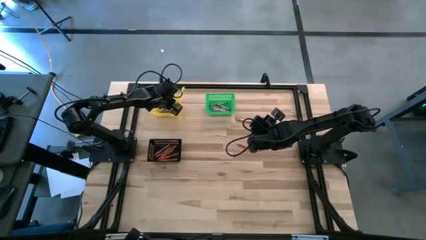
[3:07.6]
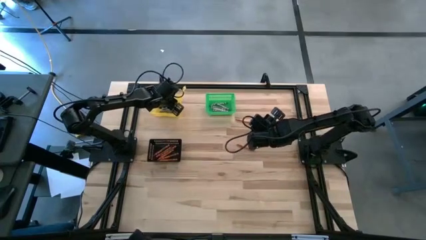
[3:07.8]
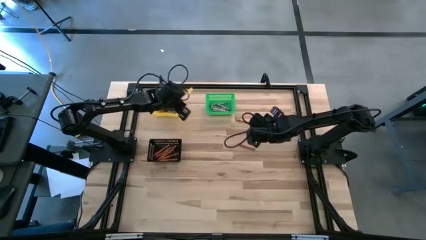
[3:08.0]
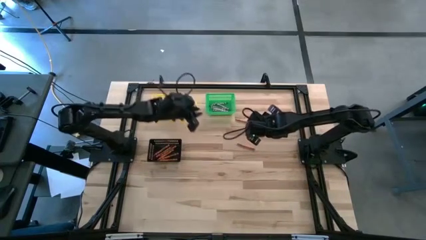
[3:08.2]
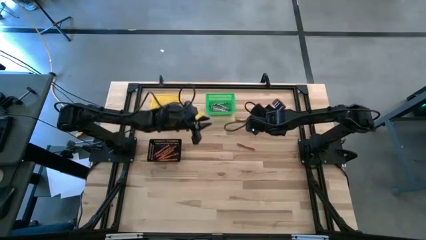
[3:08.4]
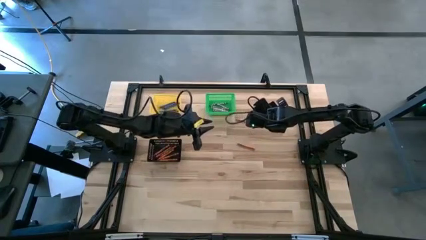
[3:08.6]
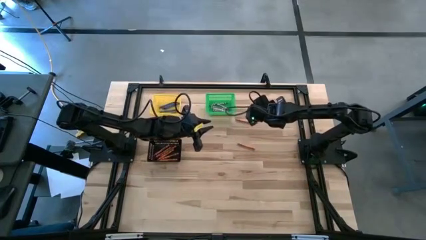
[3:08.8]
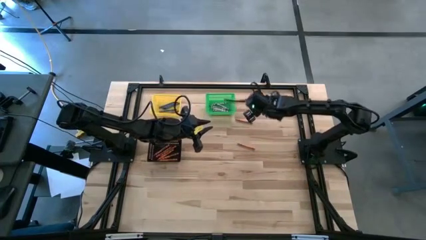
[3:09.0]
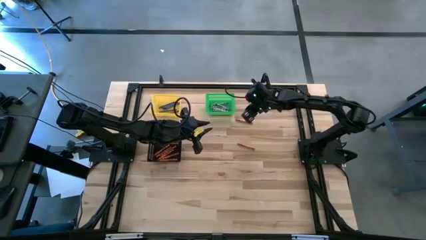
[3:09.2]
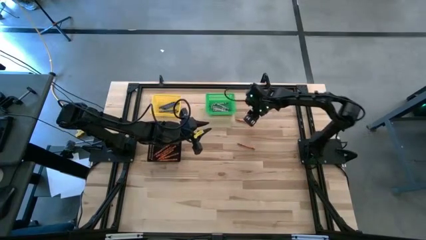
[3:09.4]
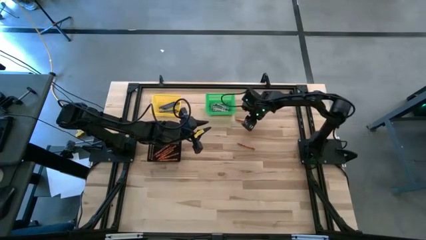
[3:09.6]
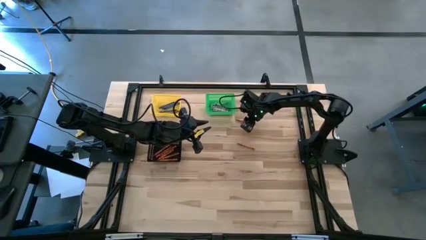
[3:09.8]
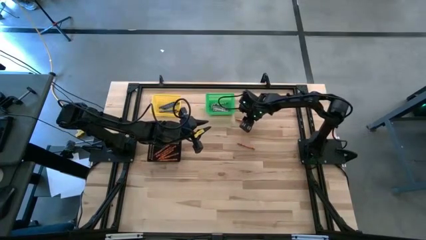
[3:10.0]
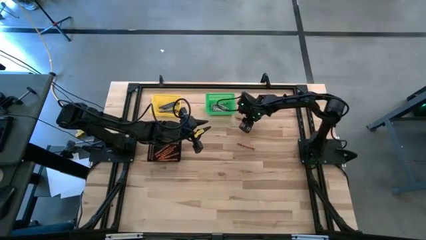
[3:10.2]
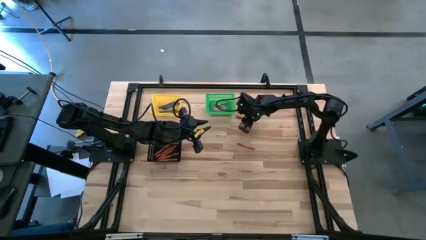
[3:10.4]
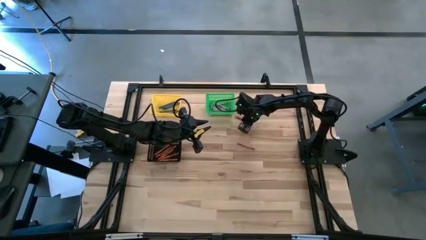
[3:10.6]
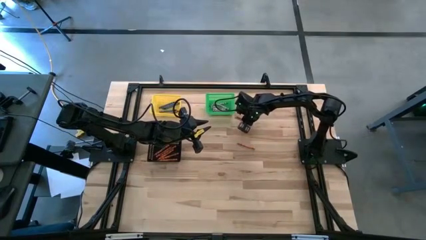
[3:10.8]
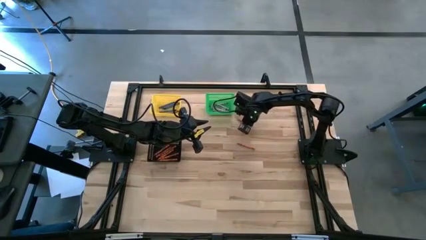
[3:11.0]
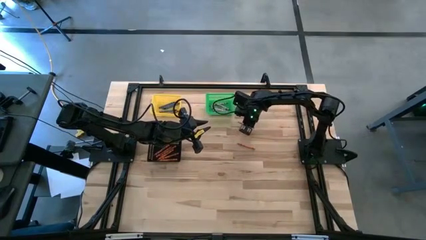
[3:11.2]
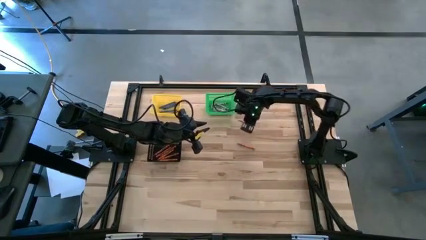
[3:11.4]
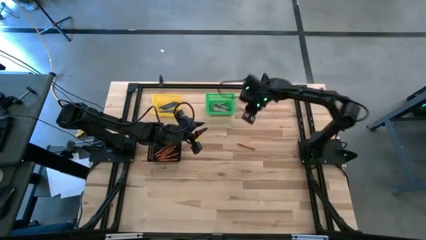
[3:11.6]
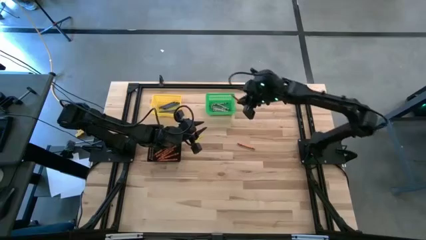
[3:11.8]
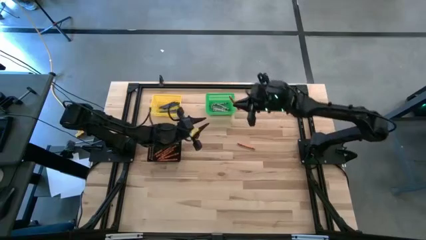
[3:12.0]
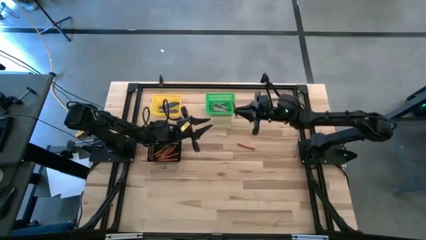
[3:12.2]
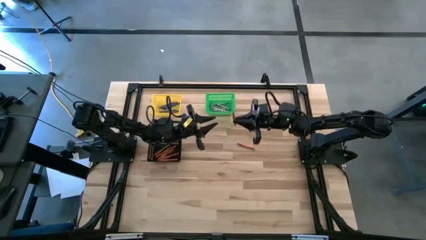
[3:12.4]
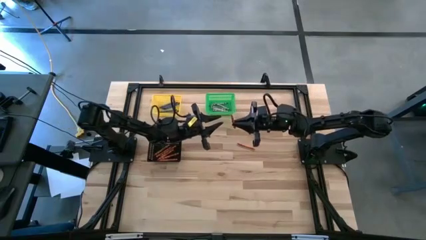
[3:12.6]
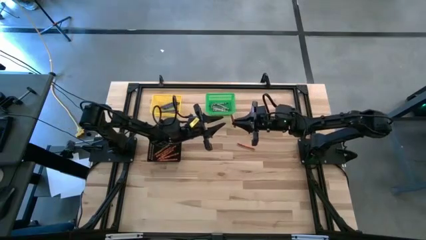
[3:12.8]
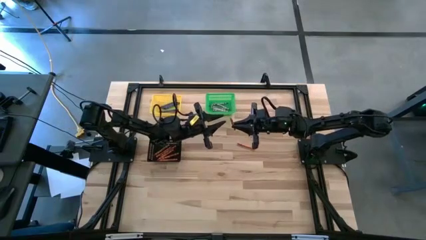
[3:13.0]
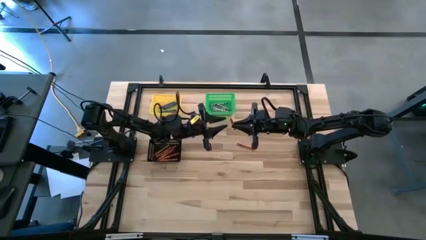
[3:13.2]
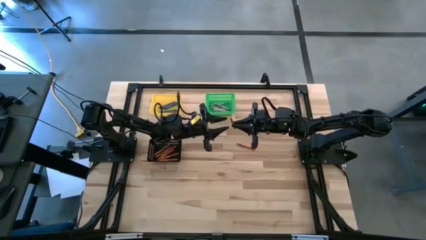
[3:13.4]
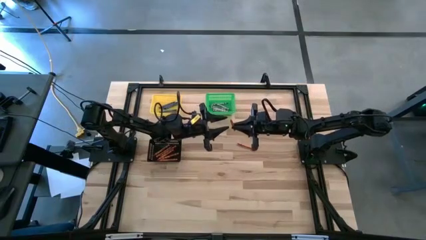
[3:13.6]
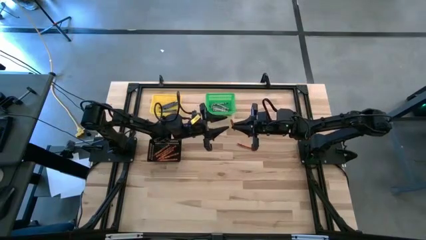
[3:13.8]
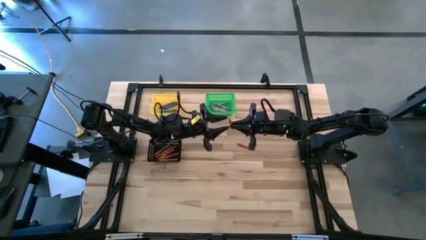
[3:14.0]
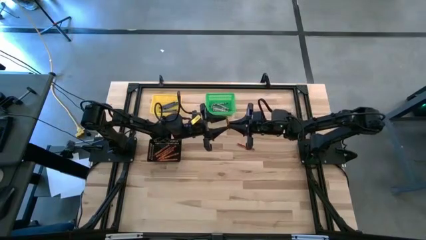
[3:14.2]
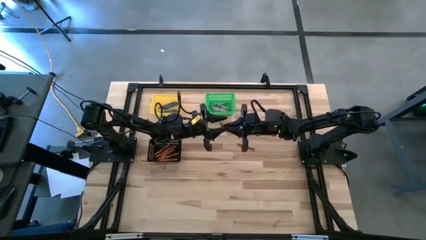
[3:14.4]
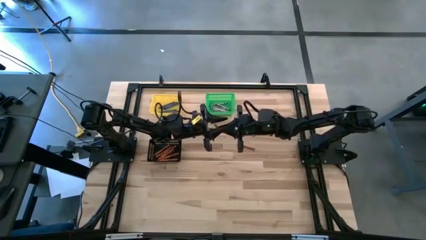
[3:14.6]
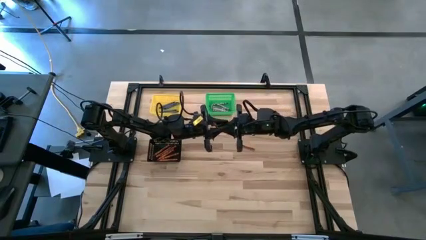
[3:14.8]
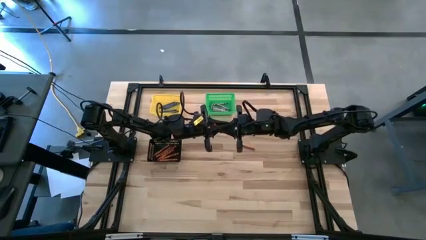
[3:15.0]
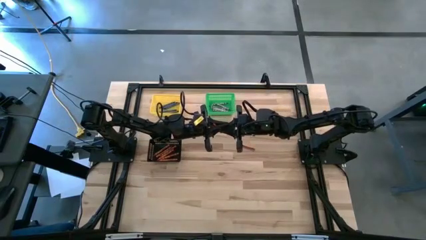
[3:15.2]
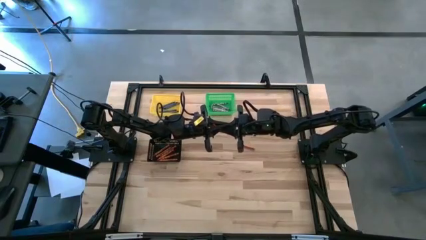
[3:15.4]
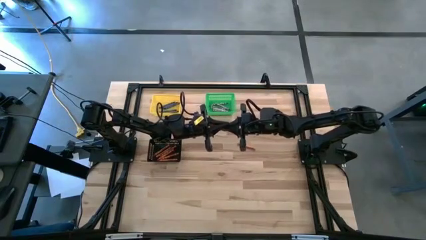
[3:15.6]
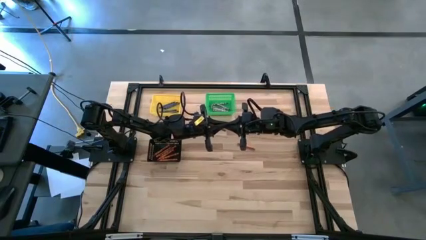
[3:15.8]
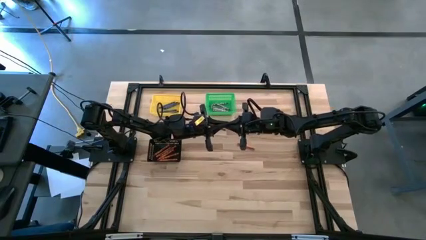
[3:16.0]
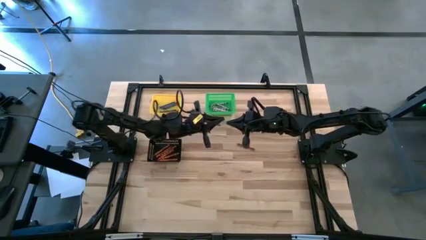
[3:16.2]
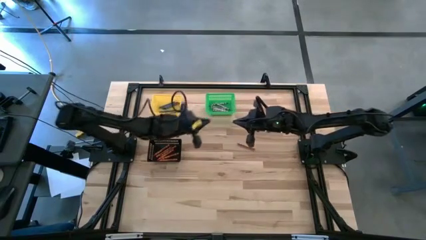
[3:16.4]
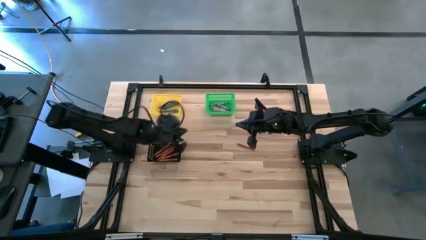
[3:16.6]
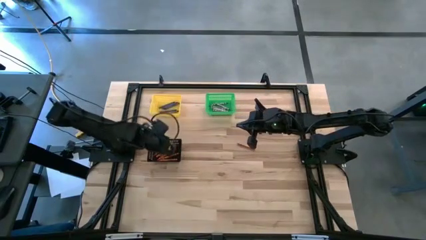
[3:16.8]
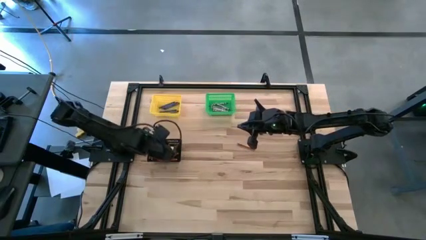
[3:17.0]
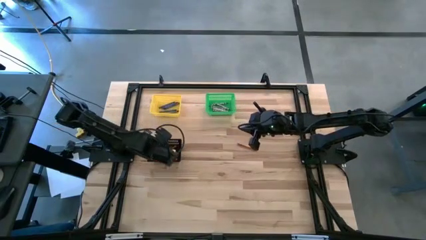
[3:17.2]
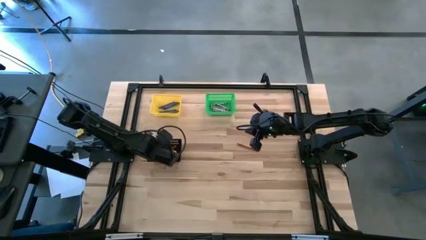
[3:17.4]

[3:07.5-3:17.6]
Task: Sort crayons
Put the orange crayon into the black bin

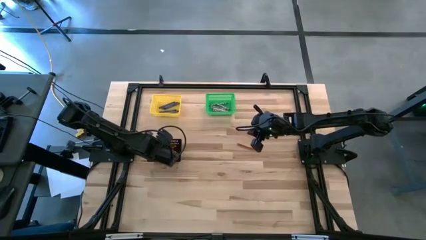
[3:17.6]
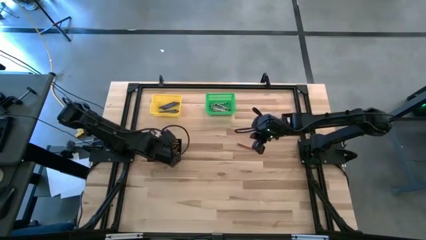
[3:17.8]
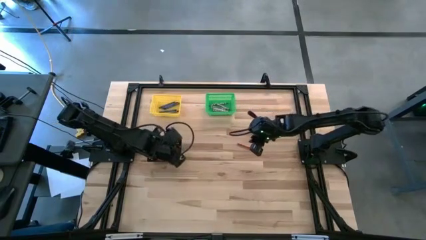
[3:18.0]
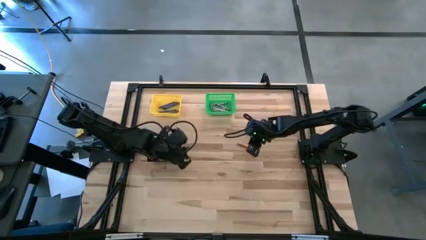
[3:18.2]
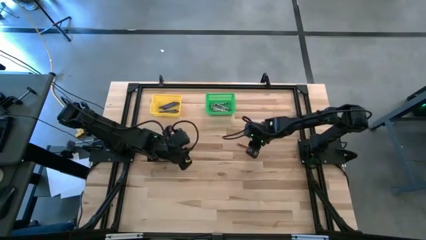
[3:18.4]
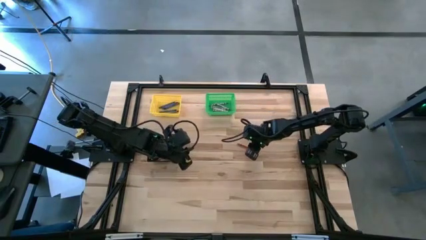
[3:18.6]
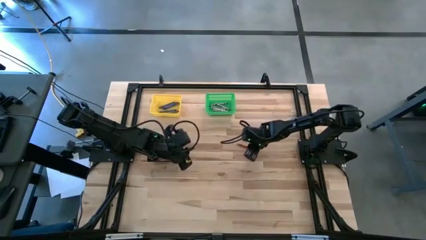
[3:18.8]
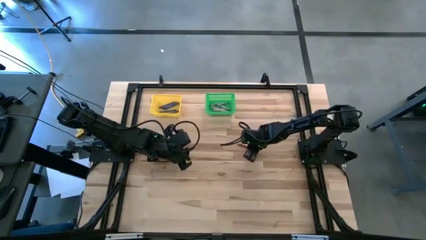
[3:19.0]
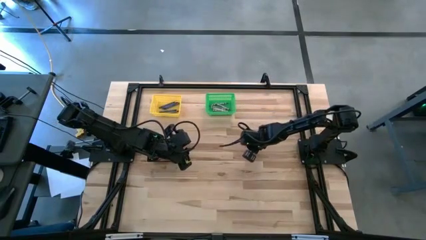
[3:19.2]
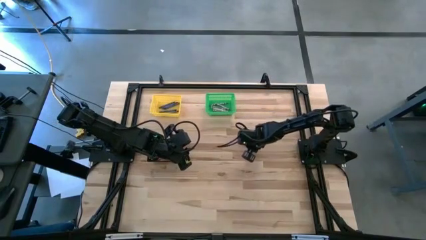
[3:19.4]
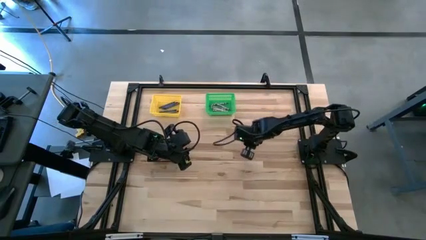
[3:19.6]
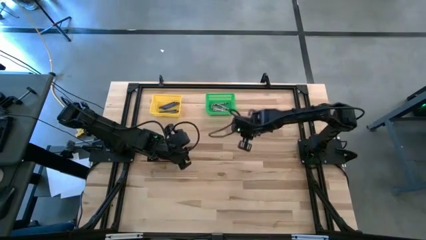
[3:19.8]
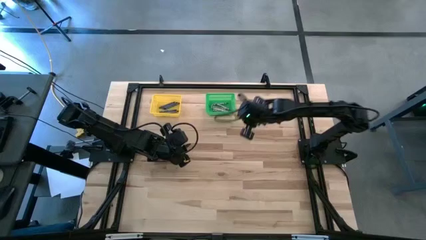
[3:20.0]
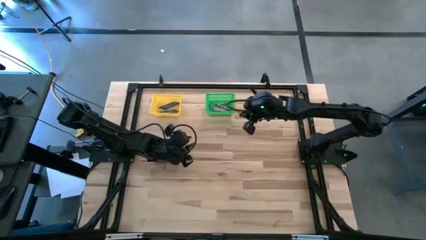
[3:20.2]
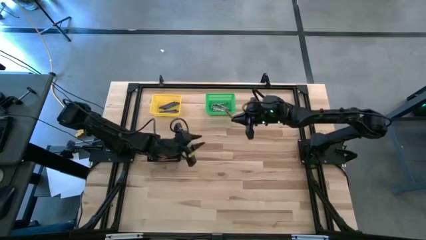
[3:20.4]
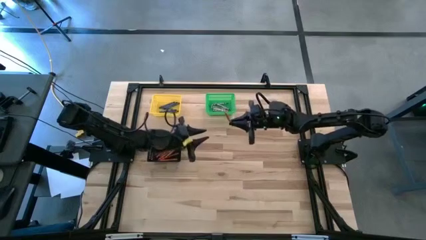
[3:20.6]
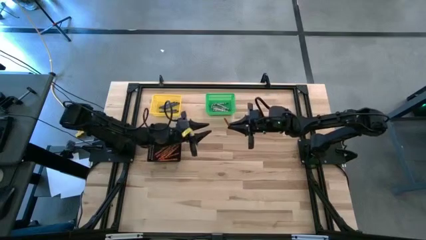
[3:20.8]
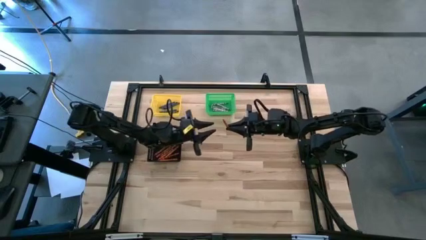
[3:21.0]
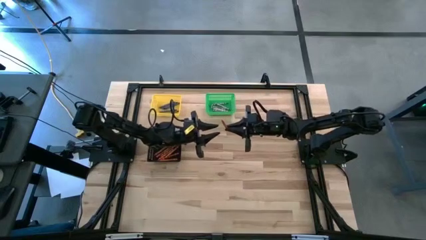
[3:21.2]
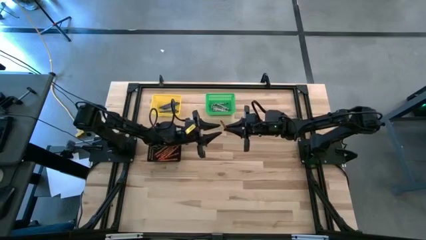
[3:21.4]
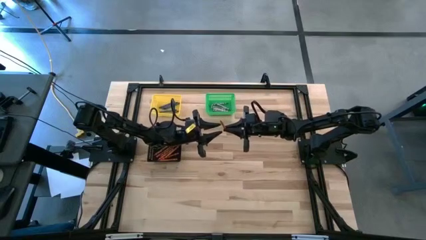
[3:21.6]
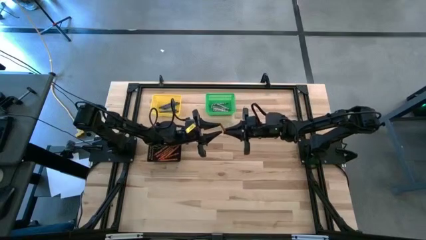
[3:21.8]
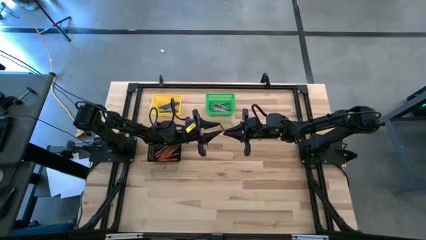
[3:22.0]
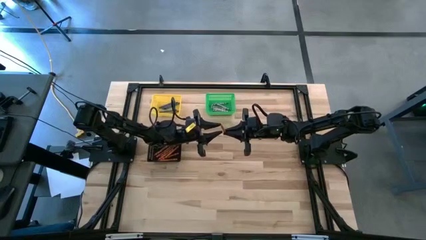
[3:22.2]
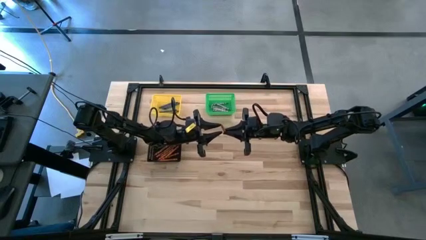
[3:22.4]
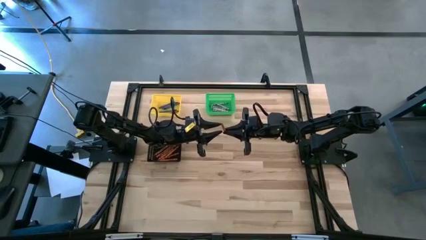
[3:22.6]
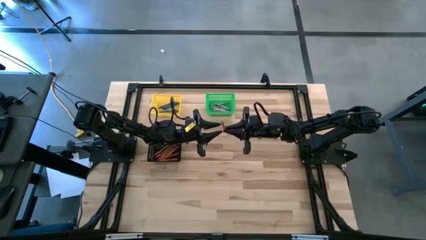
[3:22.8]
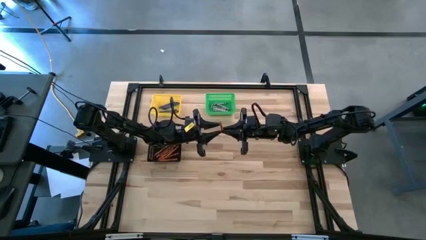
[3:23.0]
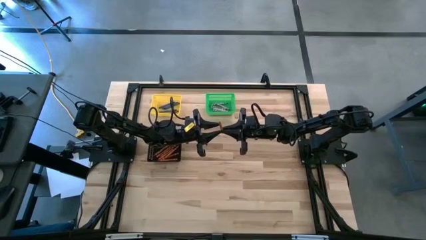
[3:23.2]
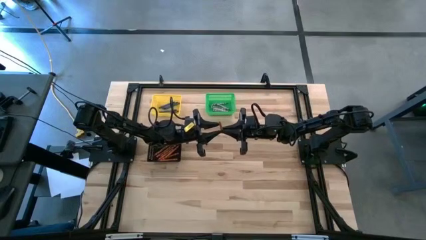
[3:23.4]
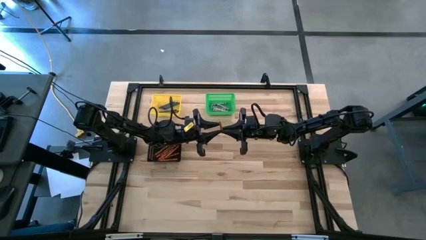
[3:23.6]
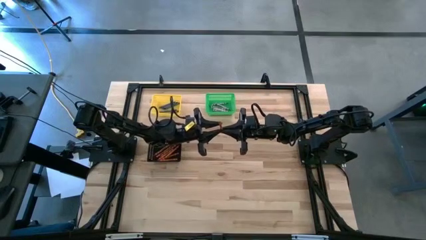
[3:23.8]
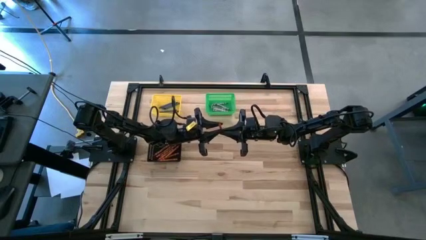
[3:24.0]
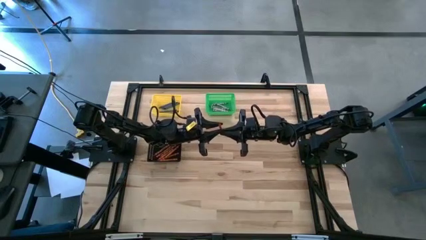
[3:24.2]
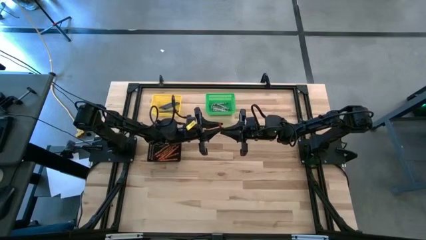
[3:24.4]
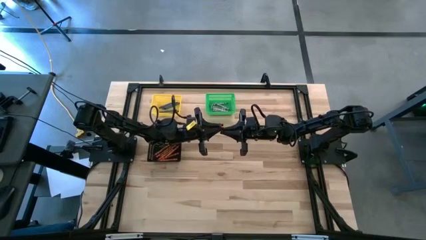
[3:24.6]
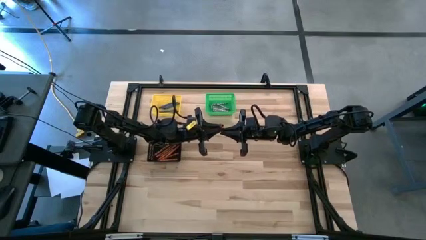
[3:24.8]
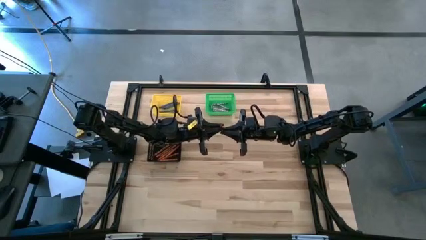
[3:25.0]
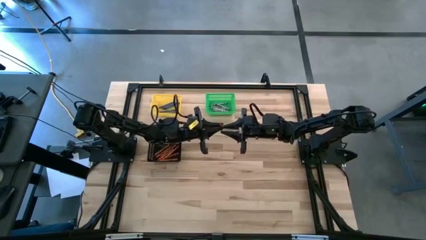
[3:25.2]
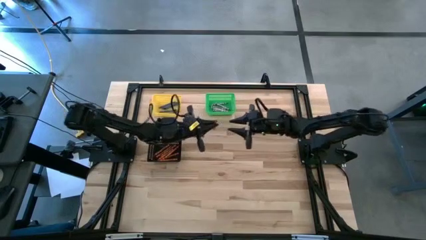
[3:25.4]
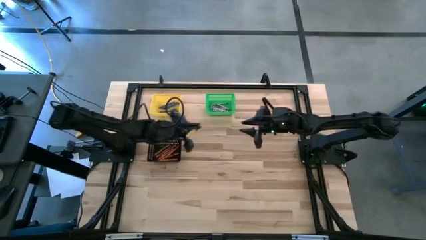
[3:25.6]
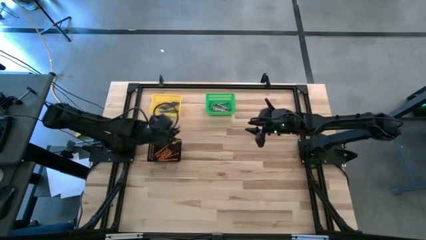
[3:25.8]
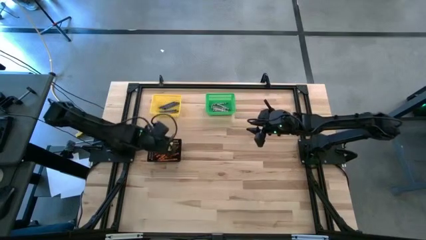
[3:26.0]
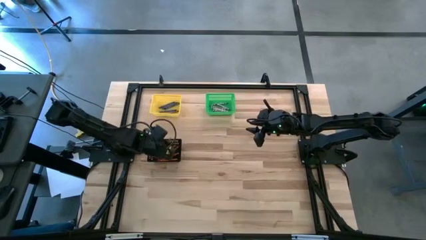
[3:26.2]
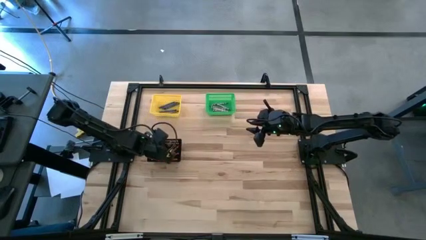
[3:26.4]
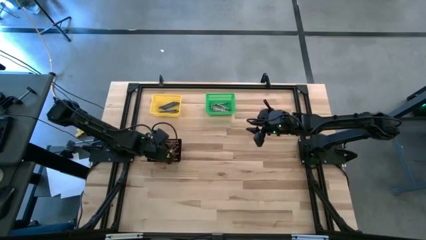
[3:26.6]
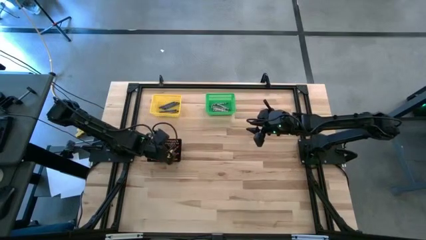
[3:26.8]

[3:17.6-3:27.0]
Put the orange crayon into the black bin
